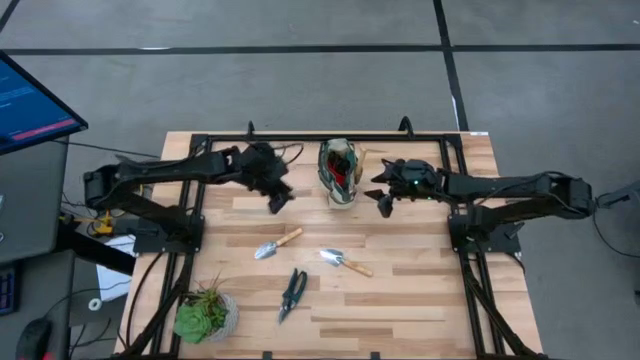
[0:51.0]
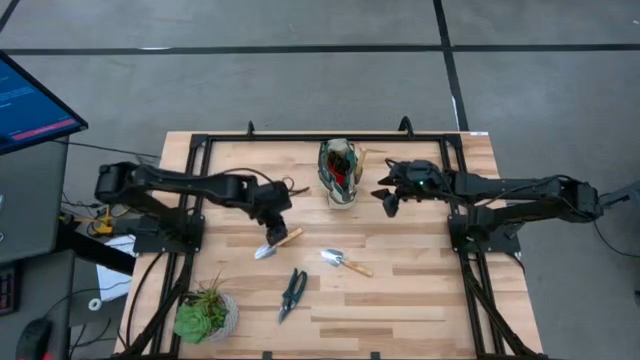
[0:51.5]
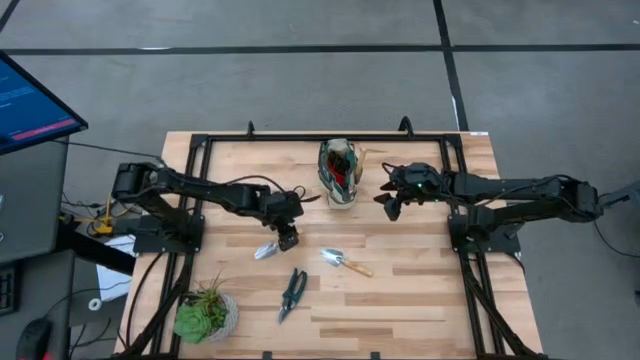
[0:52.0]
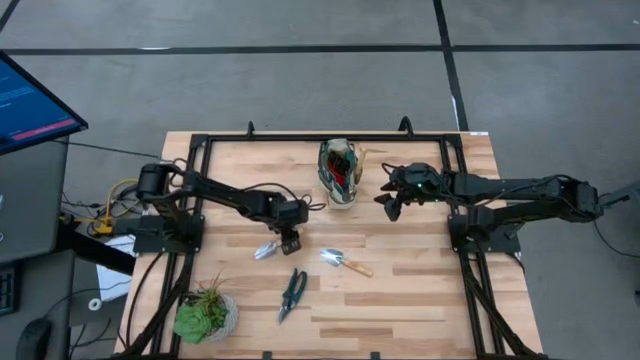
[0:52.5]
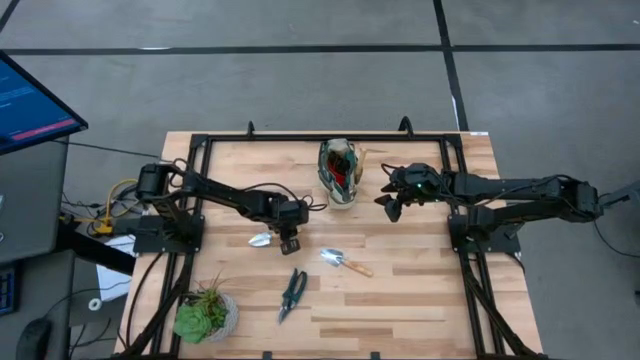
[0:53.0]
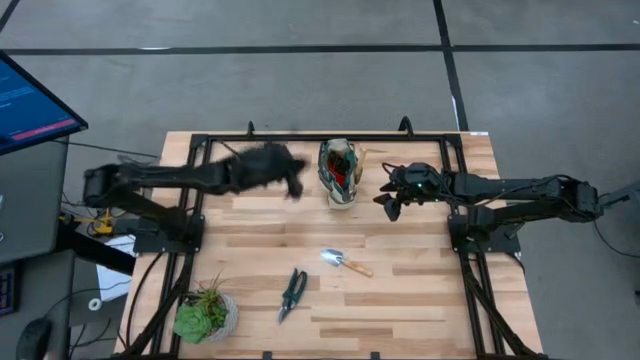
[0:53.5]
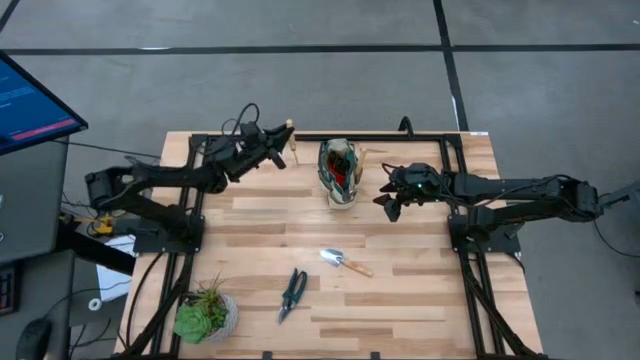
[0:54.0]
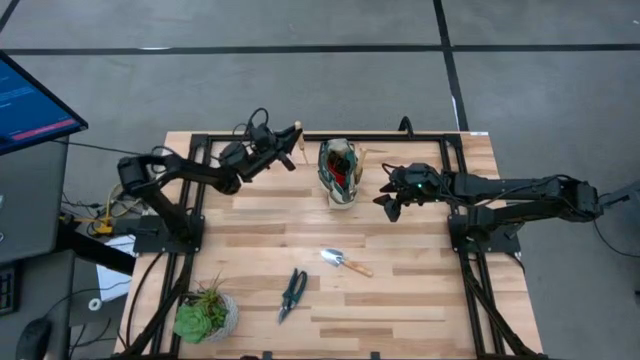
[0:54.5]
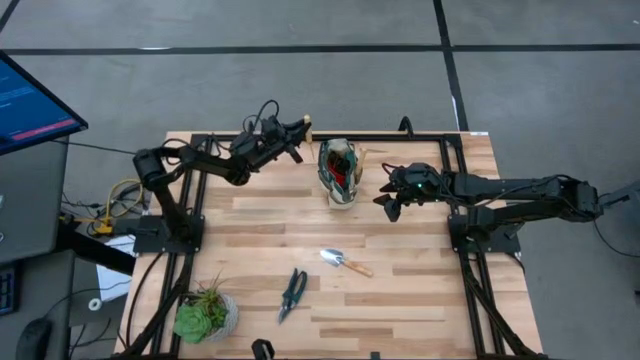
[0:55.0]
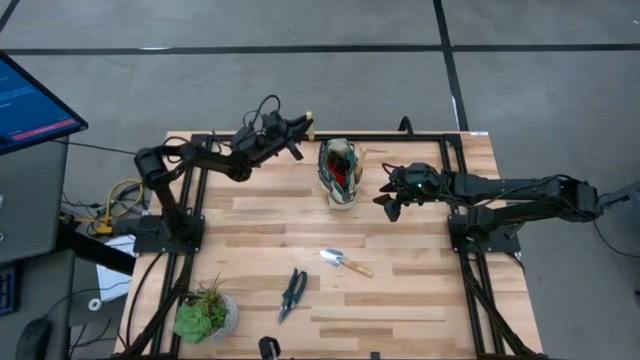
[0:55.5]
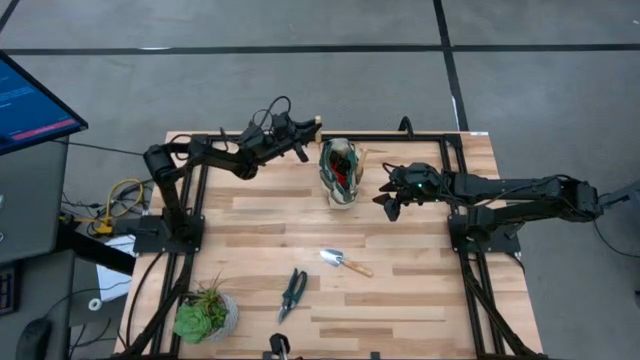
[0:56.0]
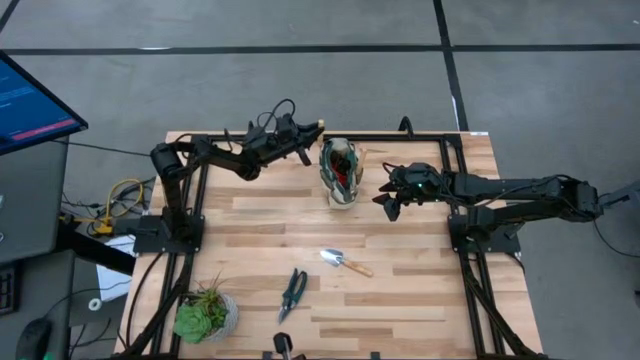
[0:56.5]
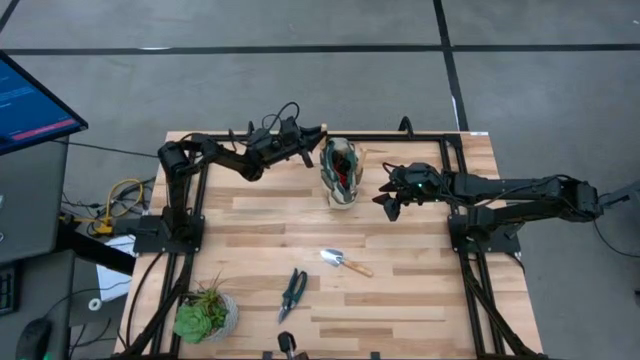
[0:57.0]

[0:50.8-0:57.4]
Task: Pick & Place Garden tools in Gardening bag
Put the trowel into the gardening bag

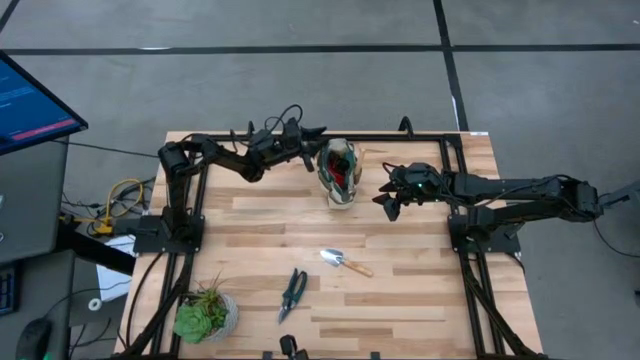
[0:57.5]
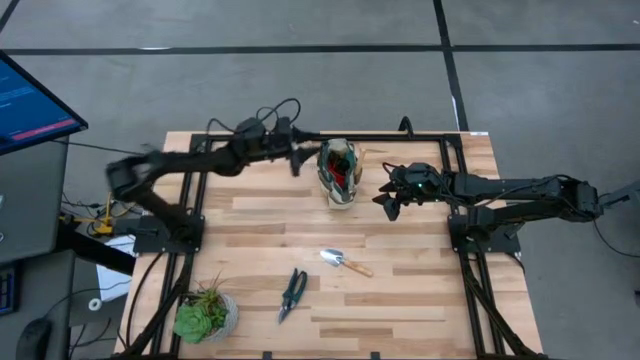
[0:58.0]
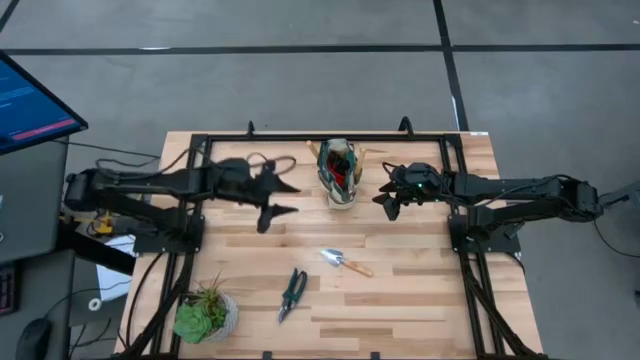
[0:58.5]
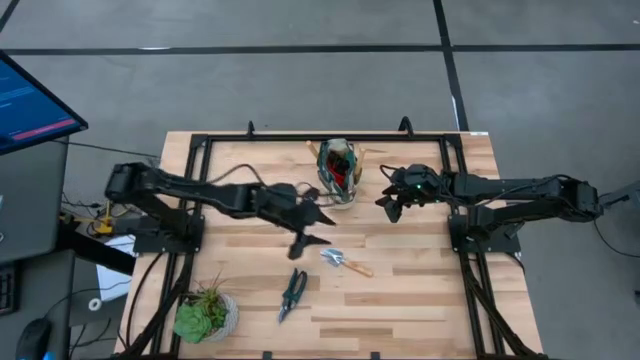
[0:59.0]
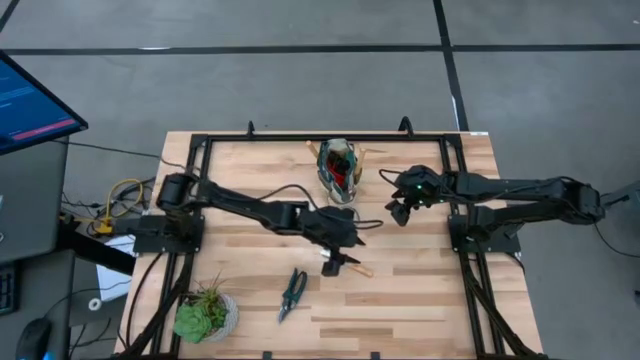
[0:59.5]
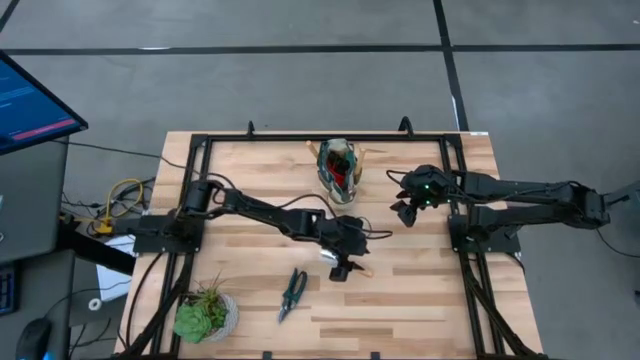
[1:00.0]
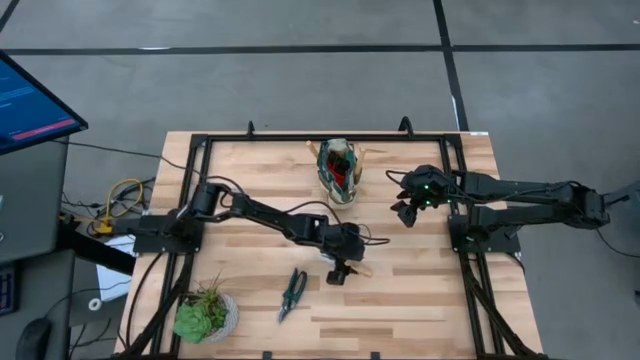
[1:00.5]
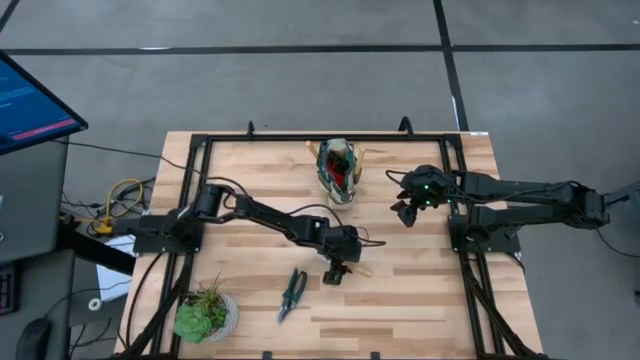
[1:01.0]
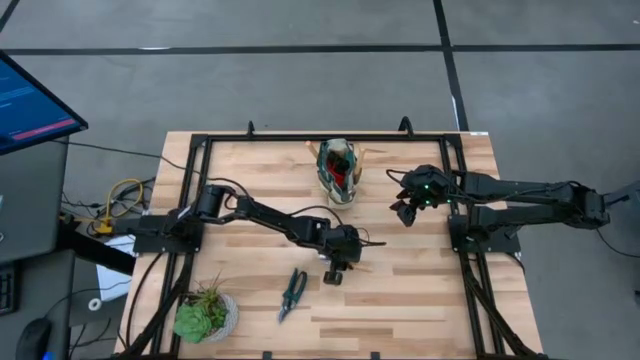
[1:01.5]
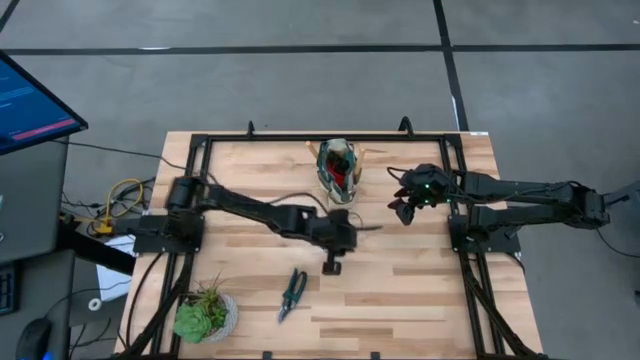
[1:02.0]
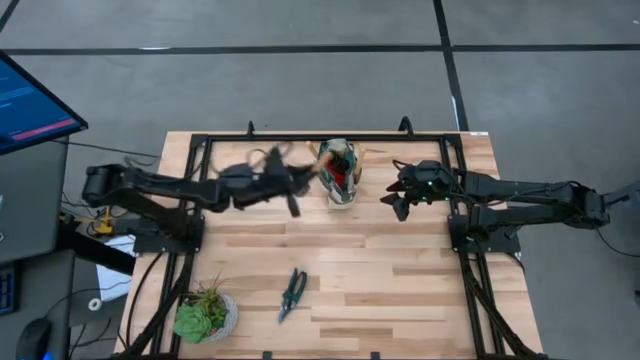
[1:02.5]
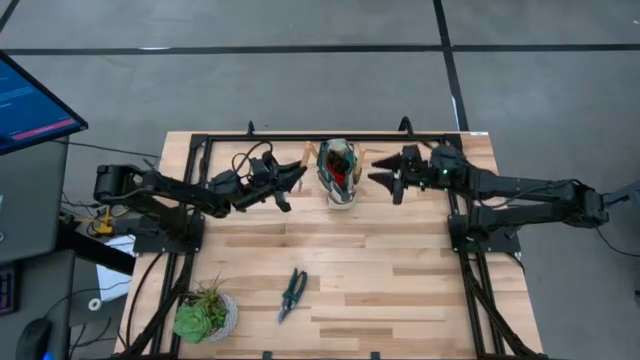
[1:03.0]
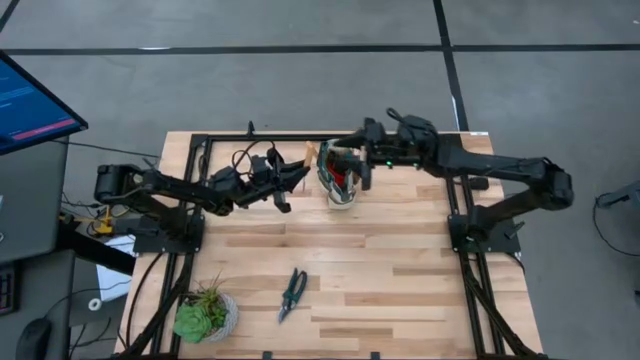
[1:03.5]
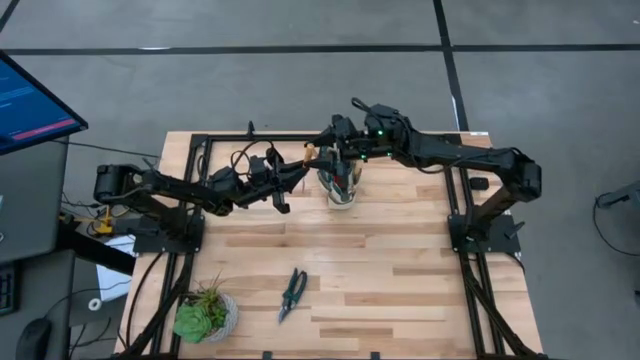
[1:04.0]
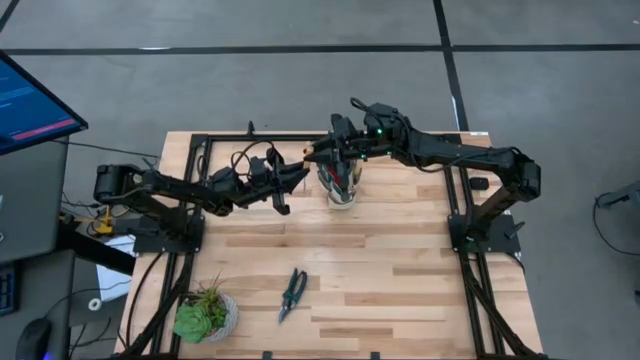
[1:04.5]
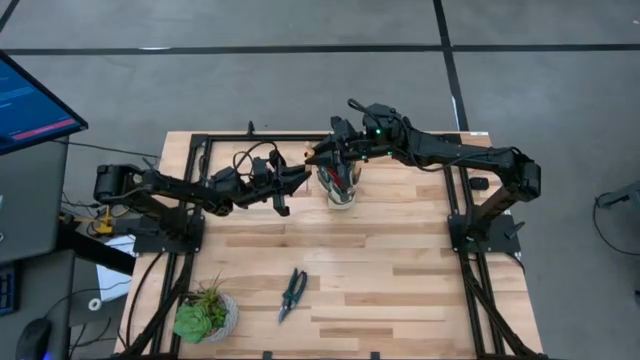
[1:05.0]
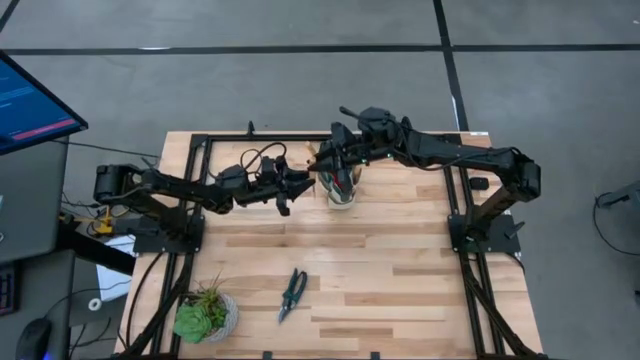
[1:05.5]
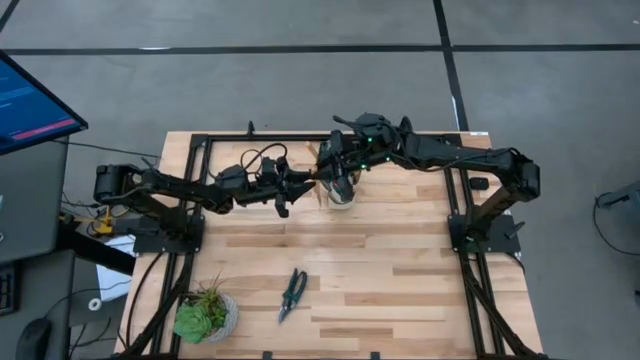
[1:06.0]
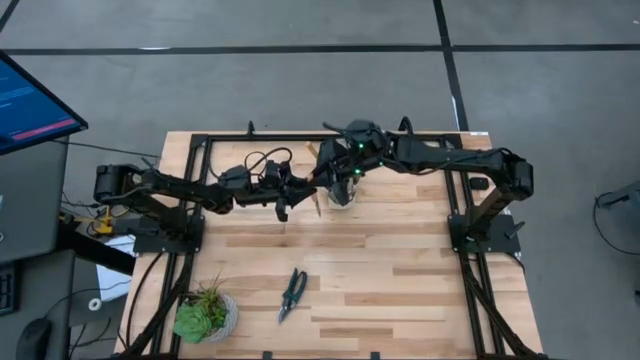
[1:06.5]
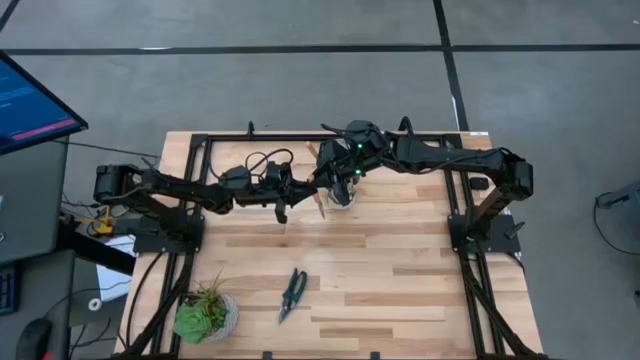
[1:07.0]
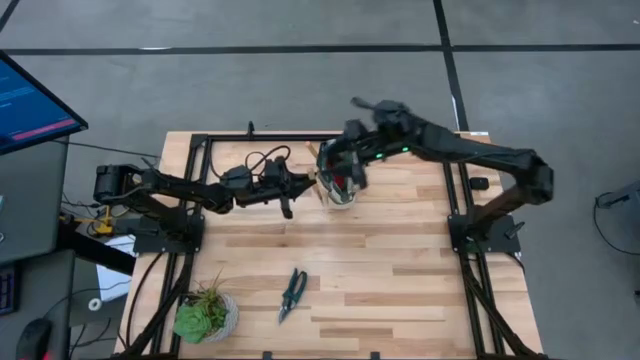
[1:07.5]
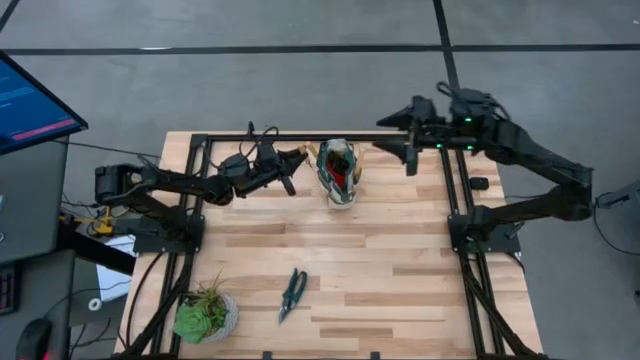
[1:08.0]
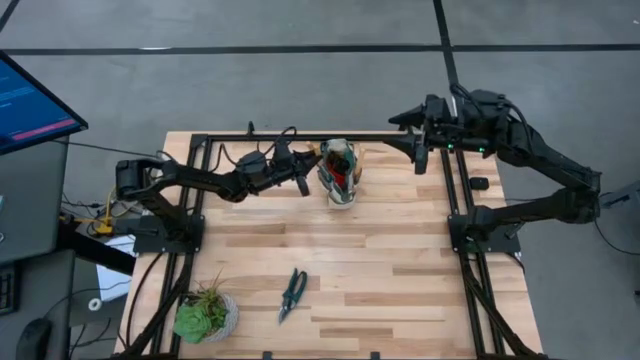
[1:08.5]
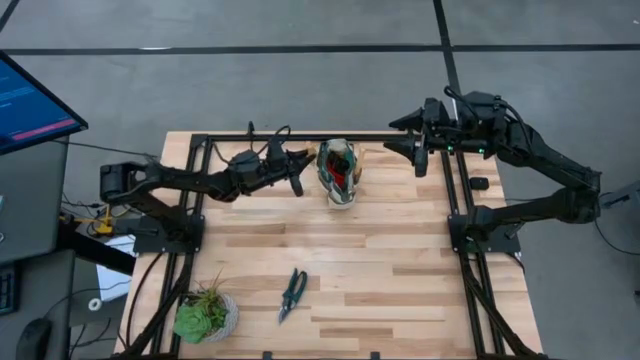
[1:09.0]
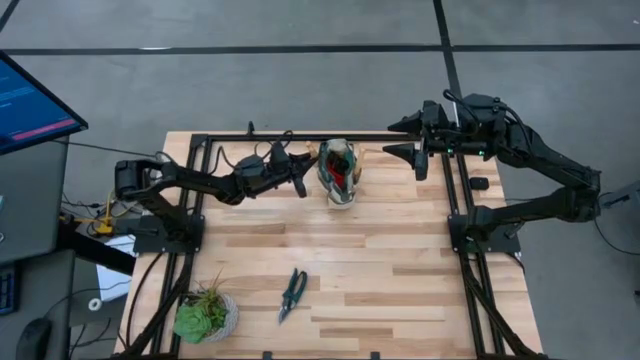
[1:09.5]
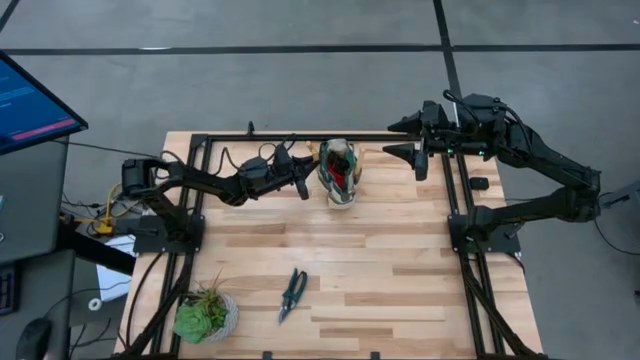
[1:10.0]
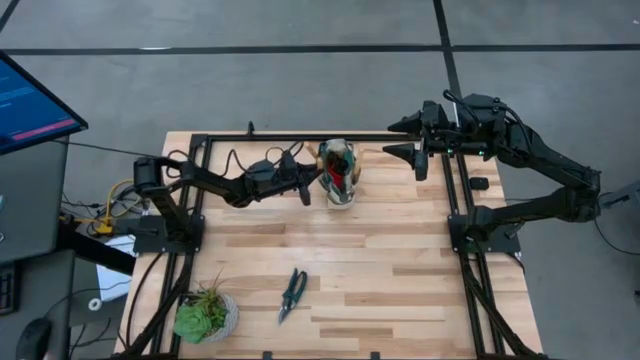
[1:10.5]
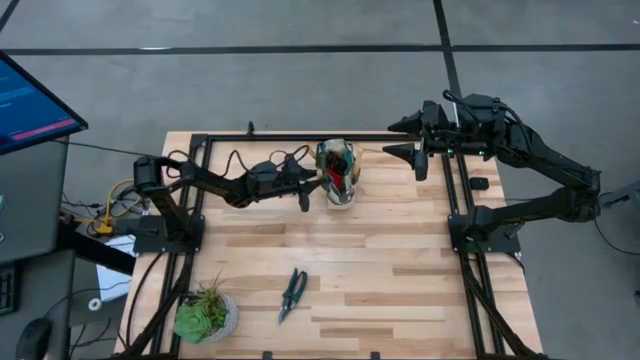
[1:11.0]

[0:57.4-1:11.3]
Put the trowel into the gardening bag

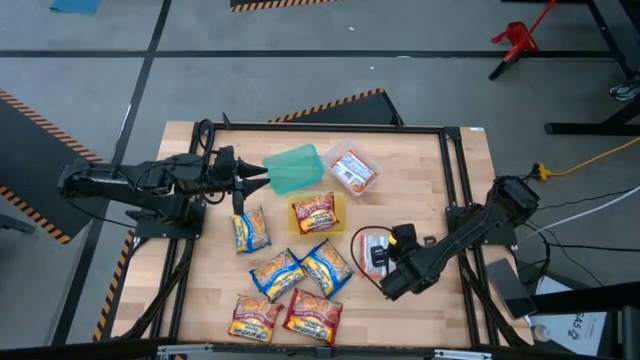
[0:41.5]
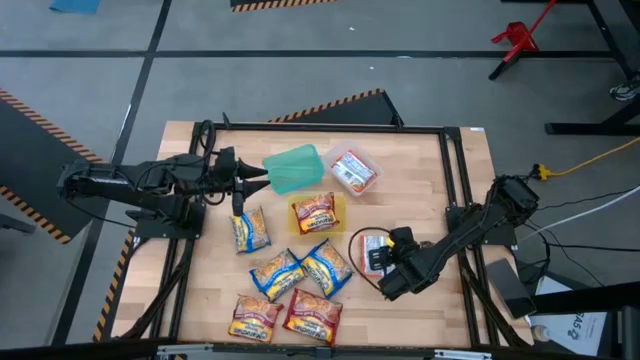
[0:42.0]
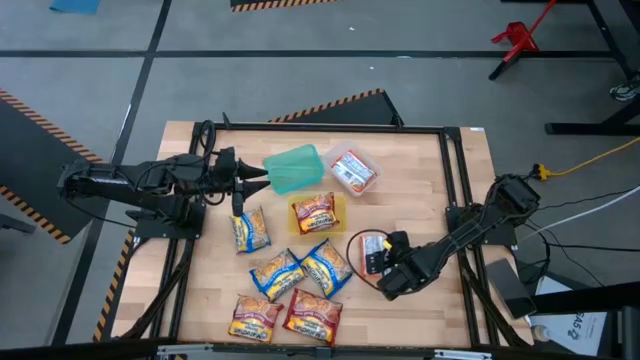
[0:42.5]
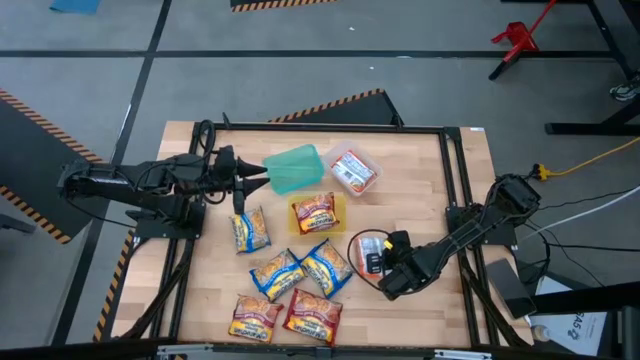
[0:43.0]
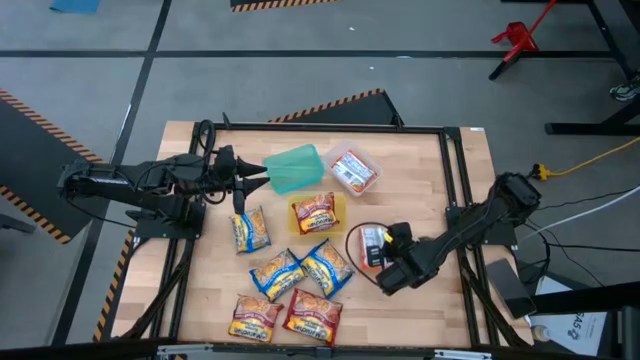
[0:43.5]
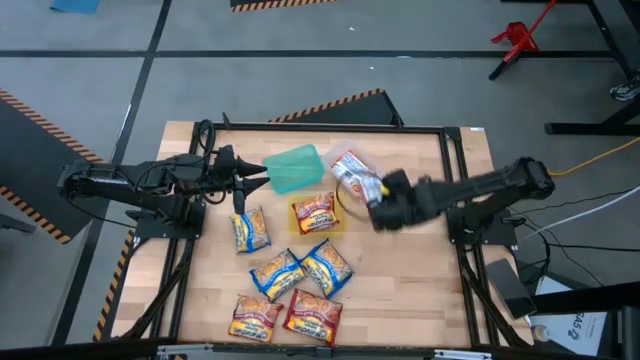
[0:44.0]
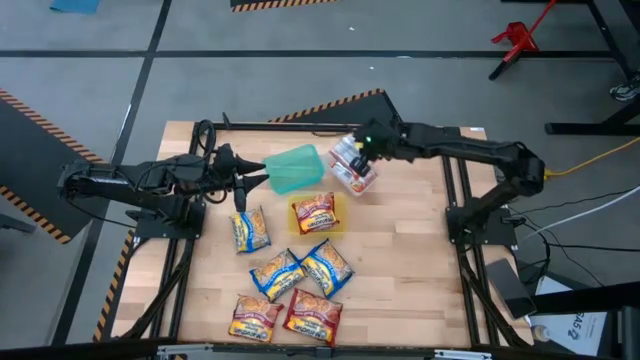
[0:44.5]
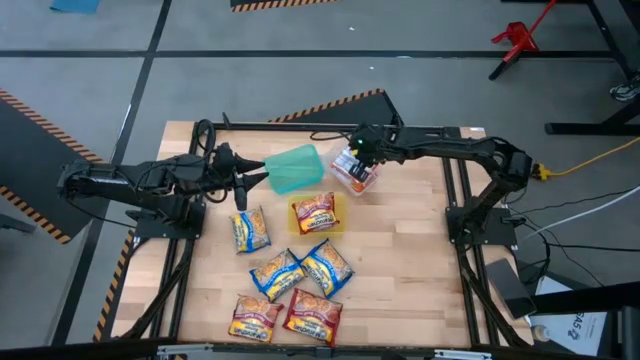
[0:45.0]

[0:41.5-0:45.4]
Task: Sort Maruchan noodles
Put the orange noodle pack into the white bin
